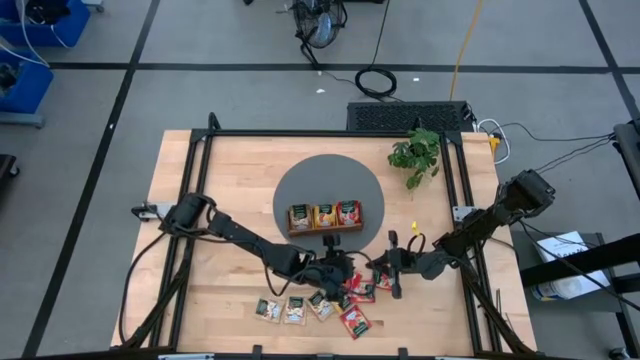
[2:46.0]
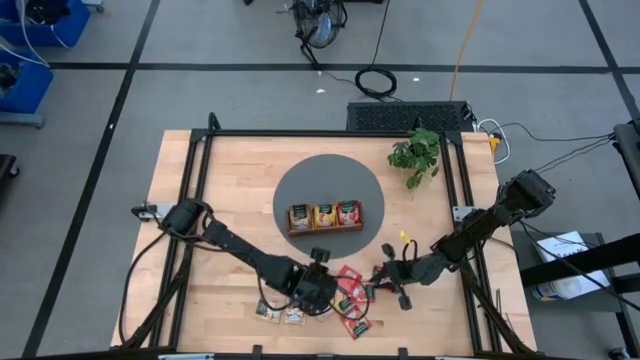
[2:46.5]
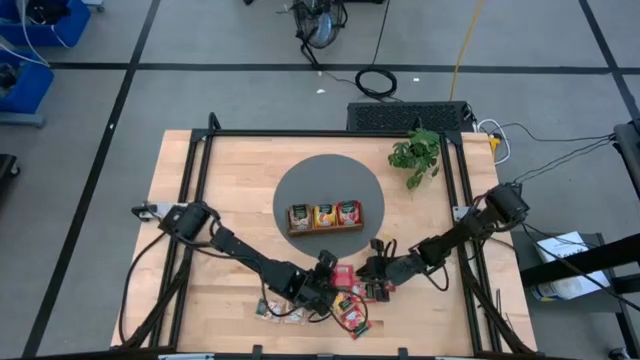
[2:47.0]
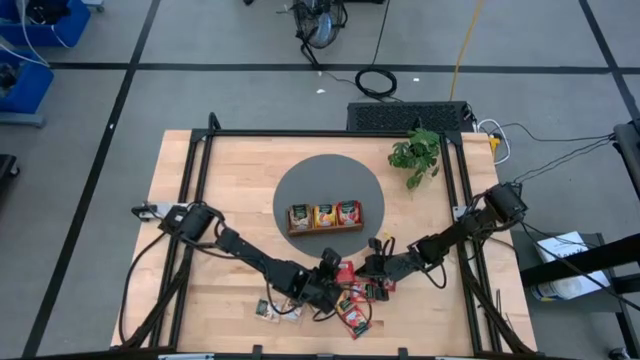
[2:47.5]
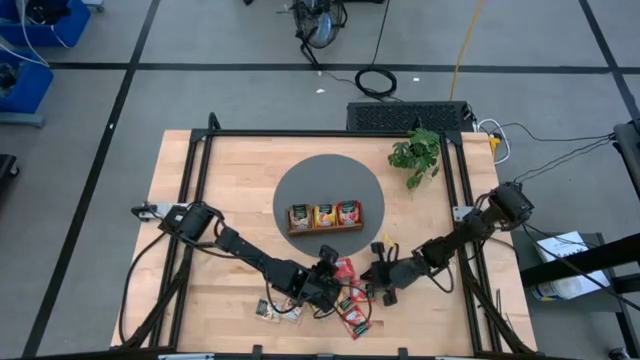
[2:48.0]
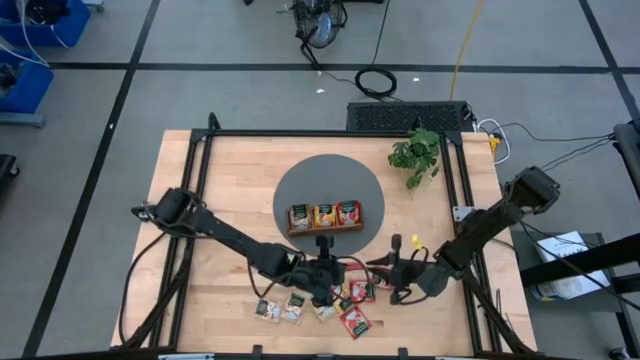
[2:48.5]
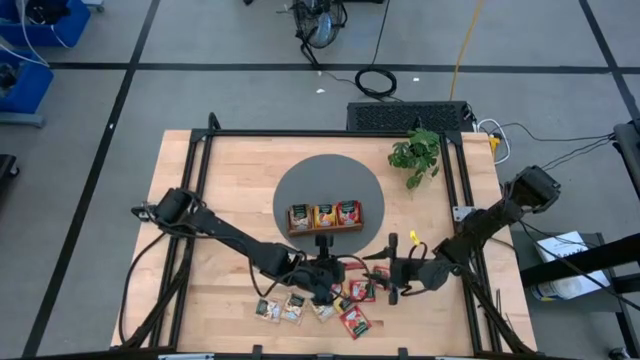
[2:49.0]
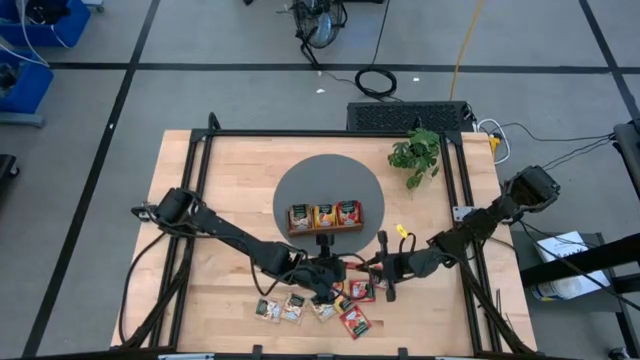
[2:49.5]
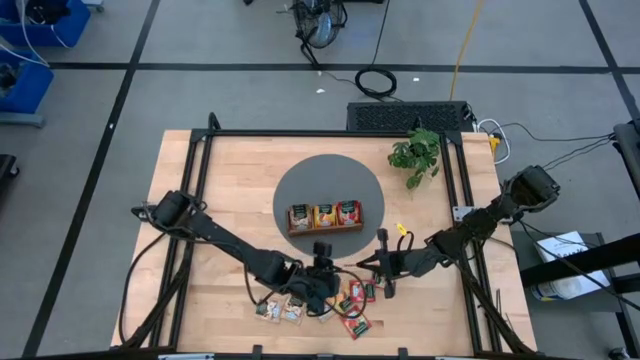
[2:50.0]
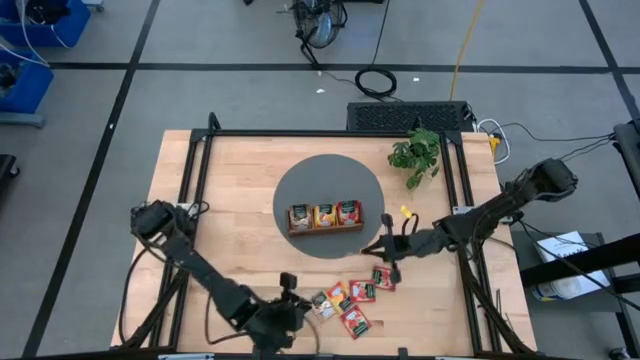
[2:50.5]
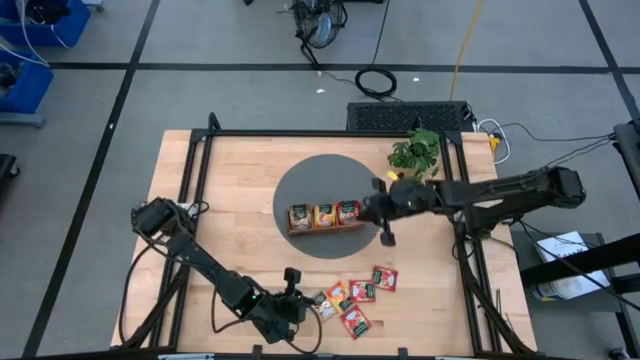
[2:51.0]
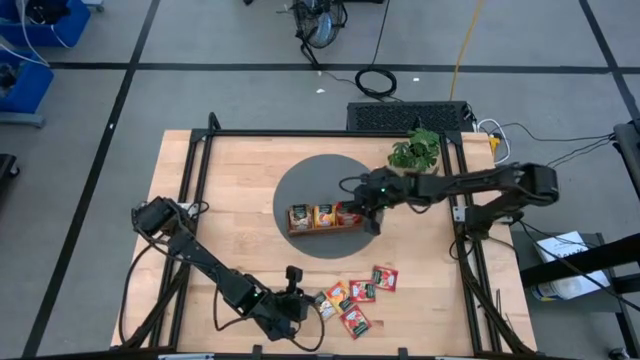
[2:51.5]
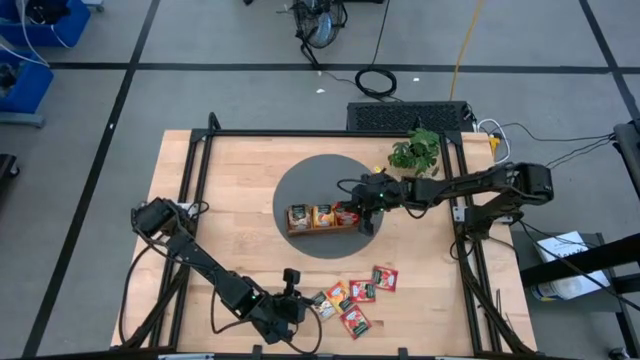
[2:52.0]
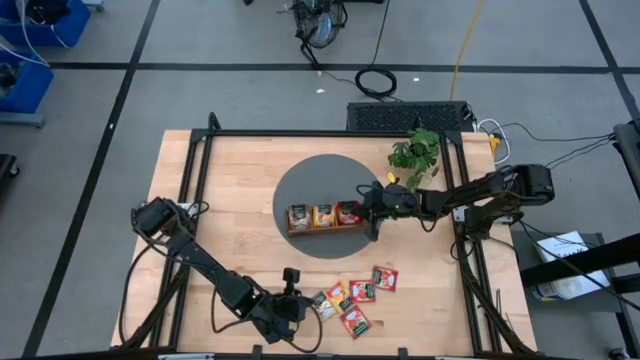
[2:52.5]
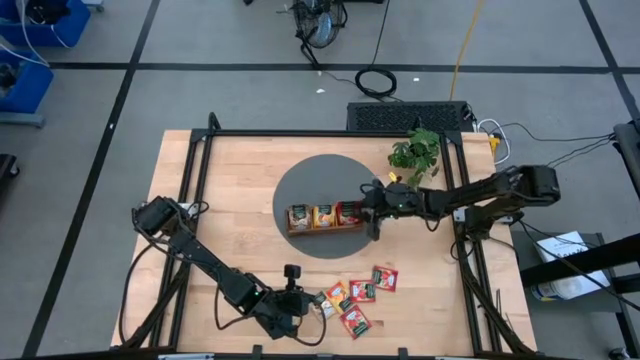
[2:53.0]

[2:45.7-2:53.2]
Task: Pick & Place Tea
Put the strawberry tea sachet into the right compartment of the wooden organizer

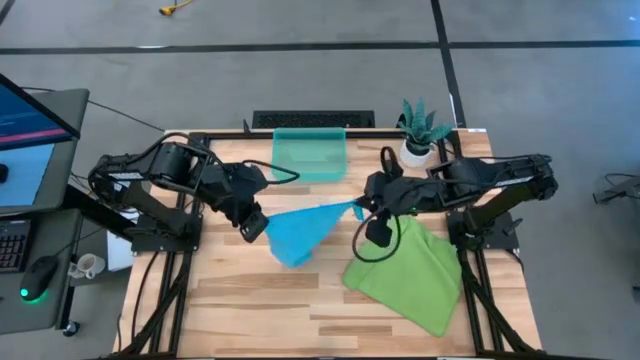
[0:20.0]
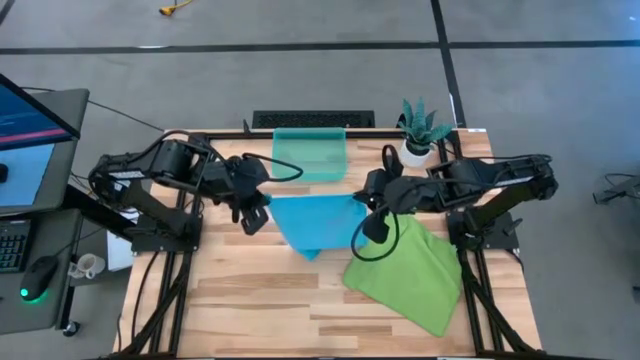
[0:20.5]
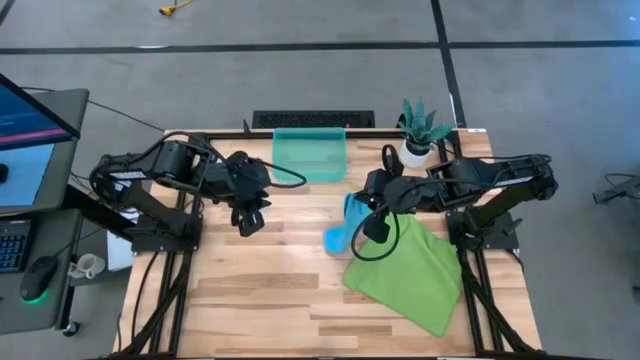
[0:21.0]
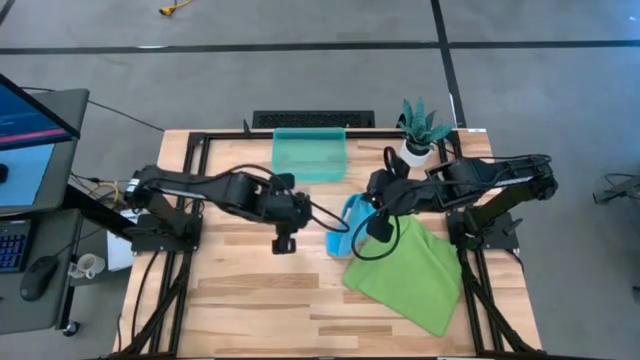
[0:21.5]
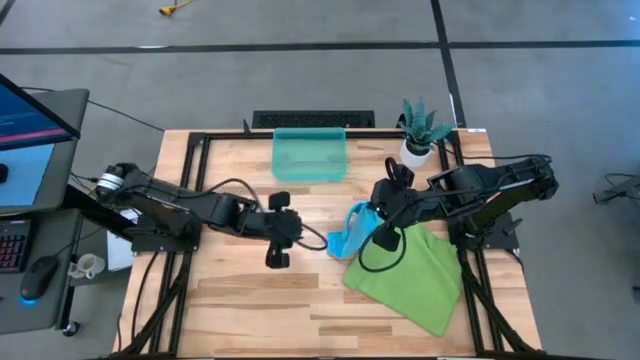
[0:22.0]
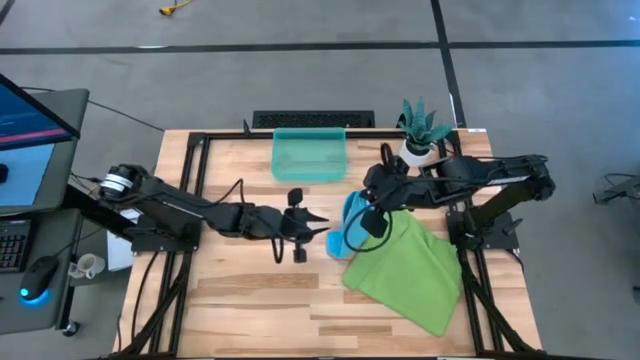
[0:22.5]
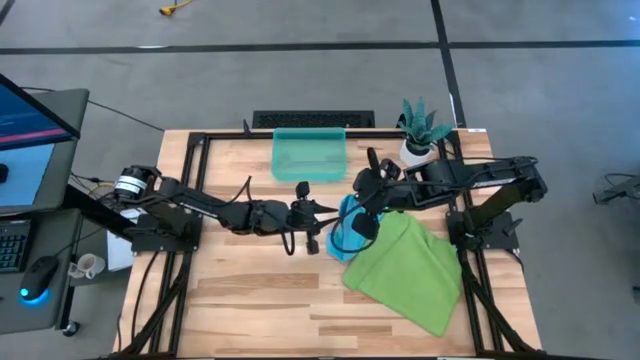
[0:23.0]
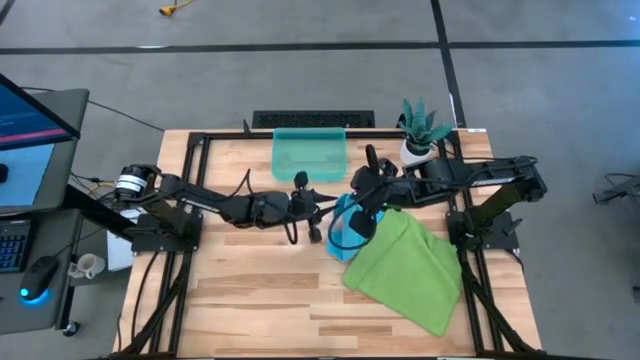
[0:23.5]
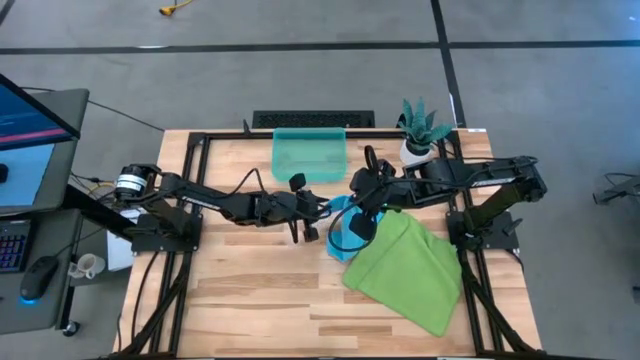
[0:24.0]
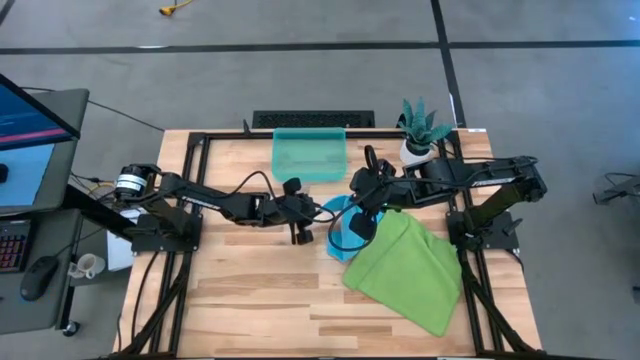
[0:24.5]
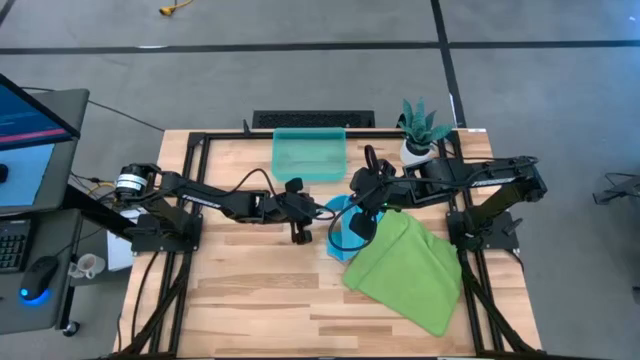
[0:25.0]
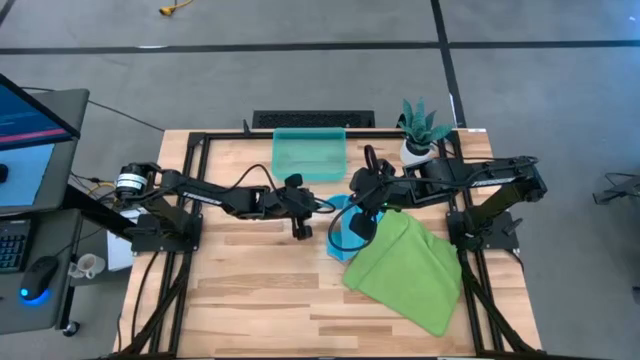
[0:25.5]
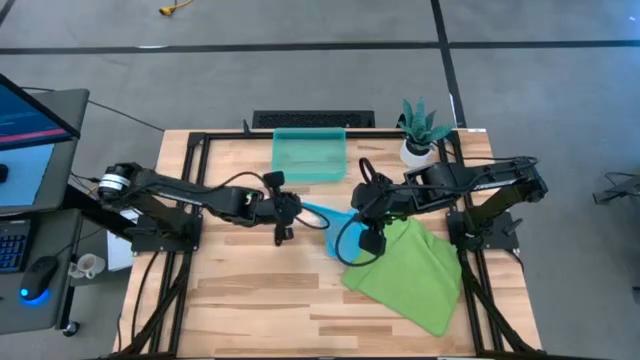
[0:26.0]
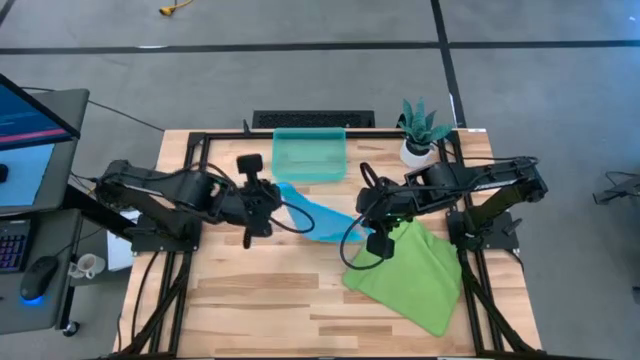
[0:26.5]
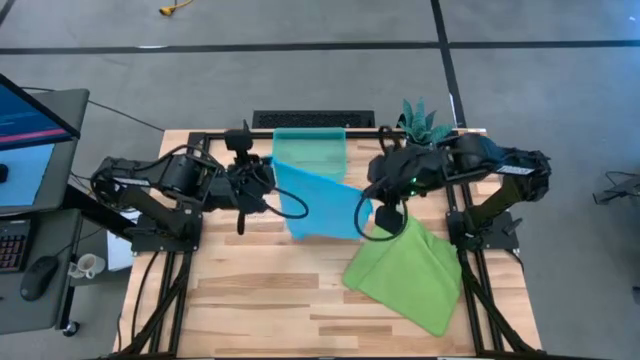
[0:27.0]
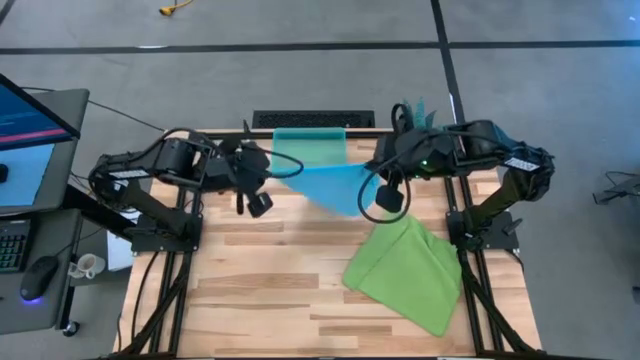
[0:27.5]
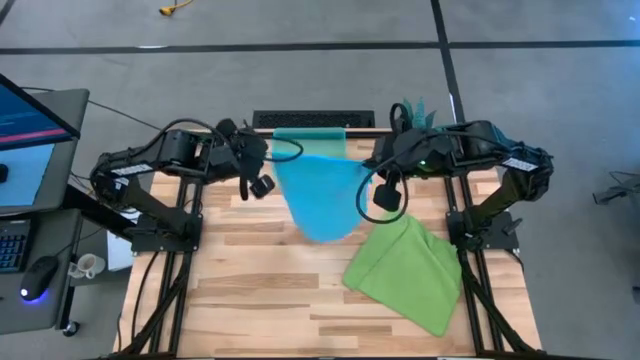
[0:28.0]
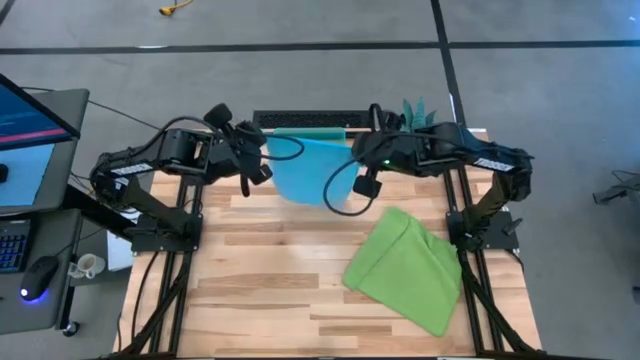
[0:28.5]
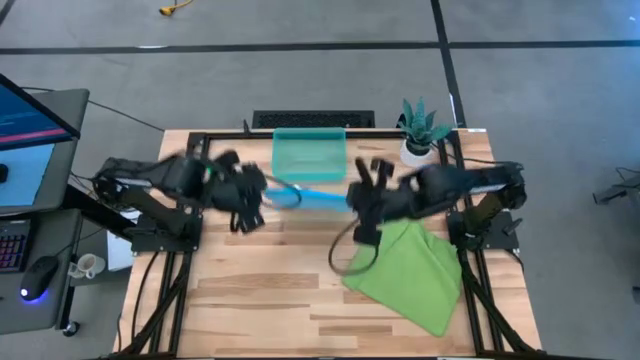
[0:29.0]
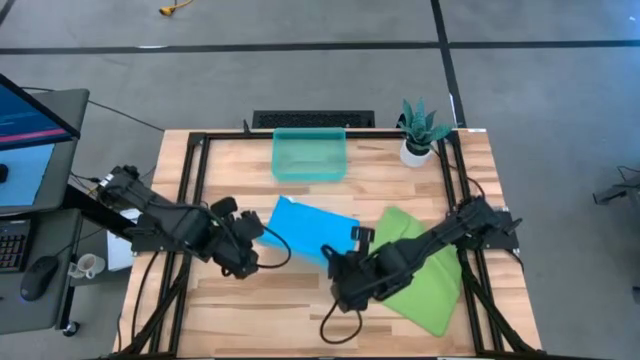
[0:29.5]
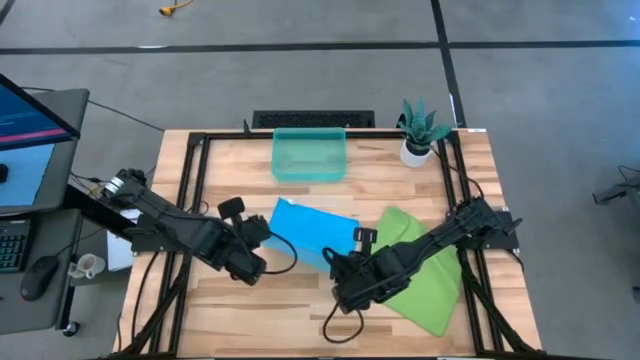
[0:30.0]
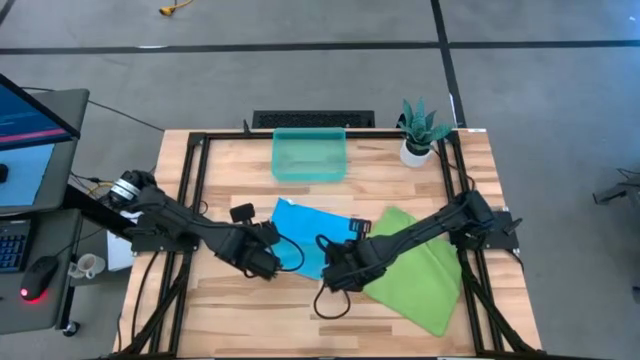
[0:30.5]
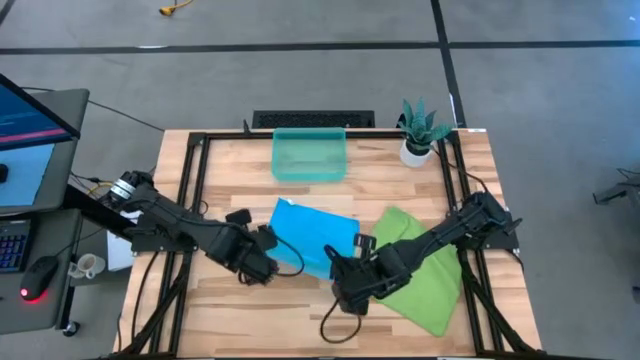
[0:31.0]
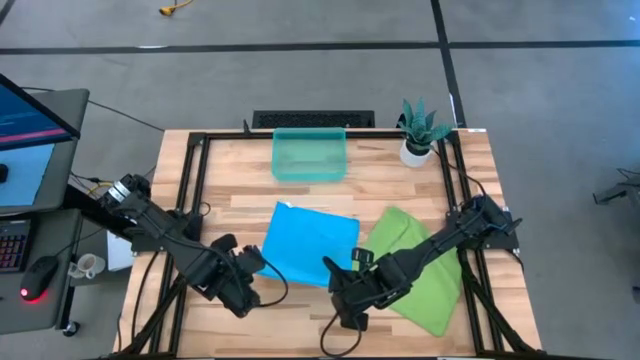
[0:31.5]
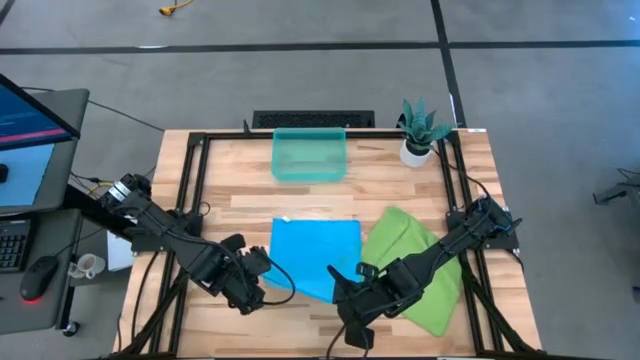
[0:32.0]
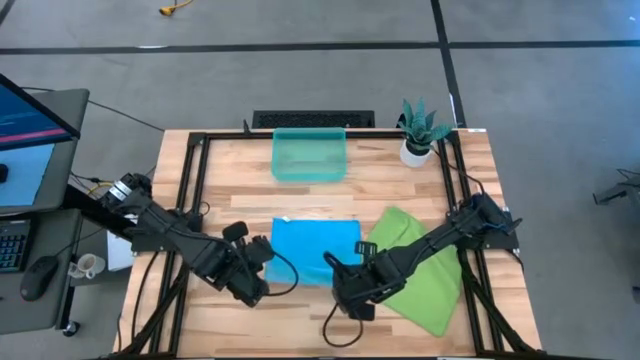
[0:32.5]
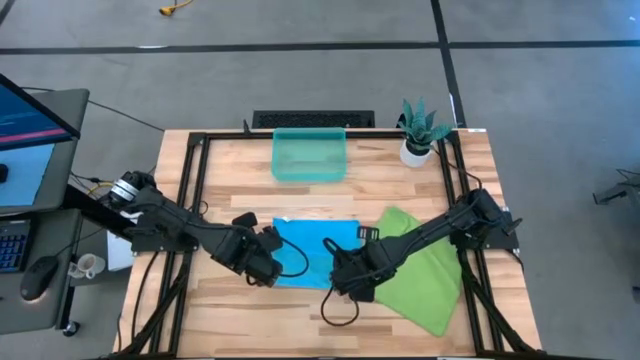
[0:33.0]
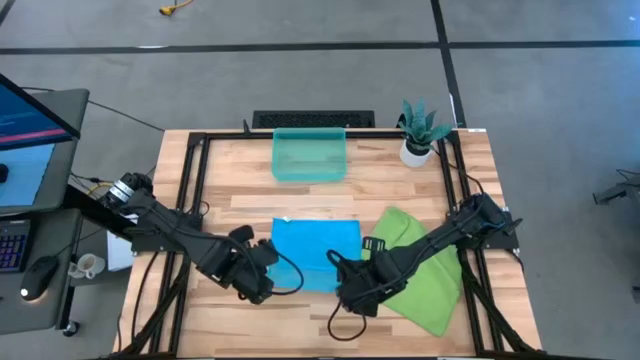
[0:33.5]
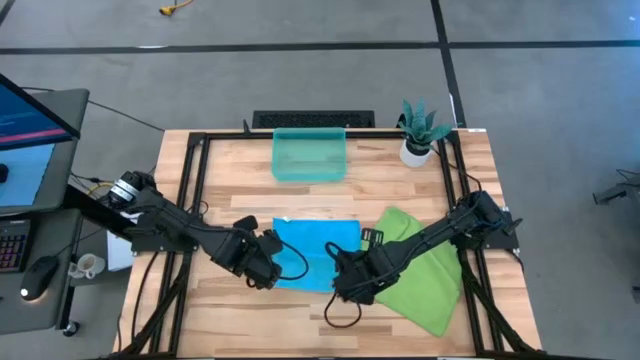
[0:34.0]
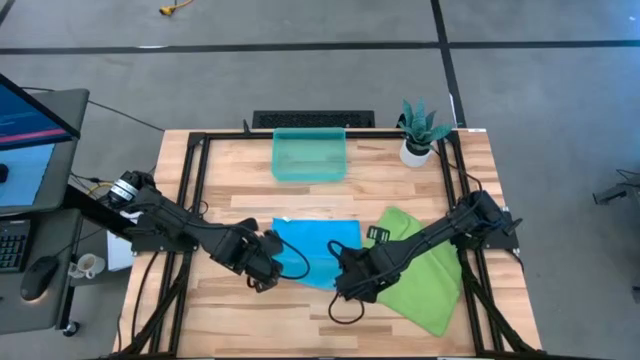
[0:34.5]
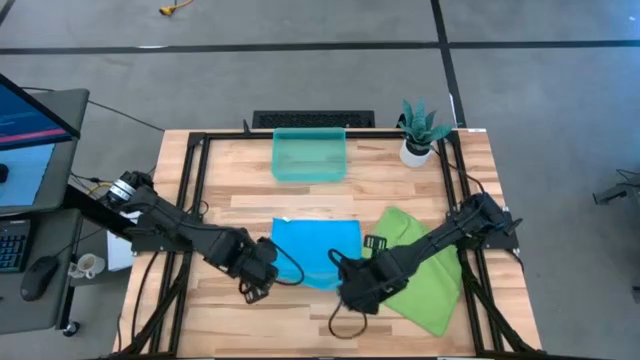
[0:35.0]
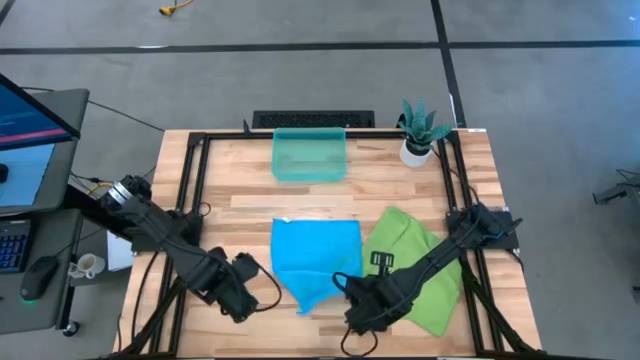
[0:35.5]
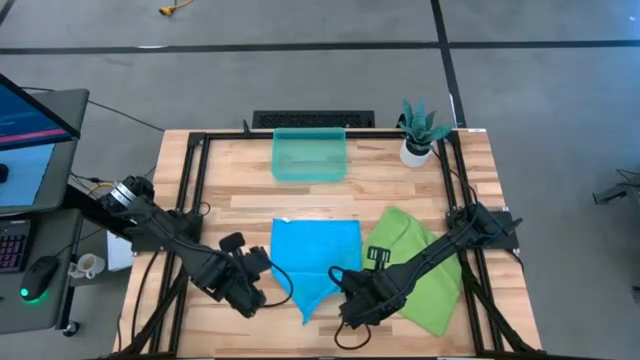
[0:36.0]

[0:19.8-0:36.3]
Task: Roll microfiber towels into tight, uniform cylinder then place into a basket
Fold the blue microfiber cloth
